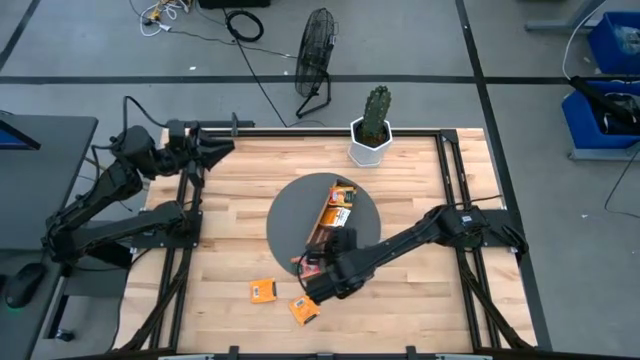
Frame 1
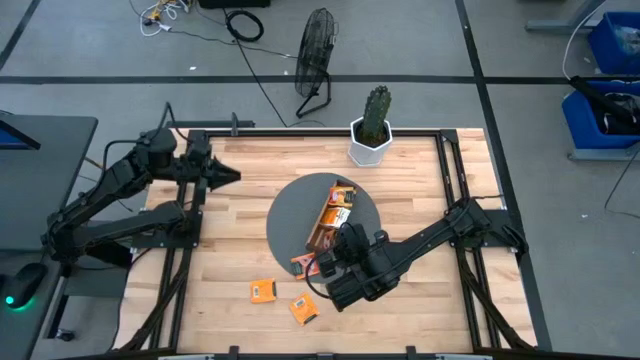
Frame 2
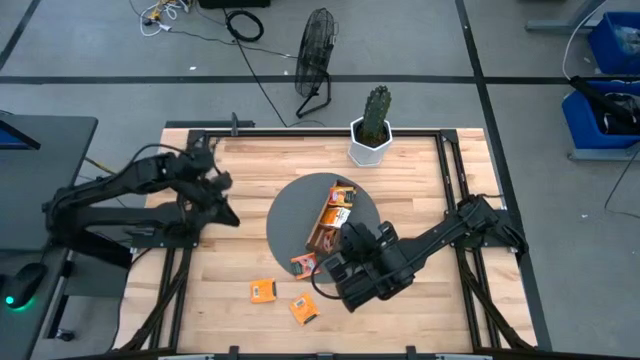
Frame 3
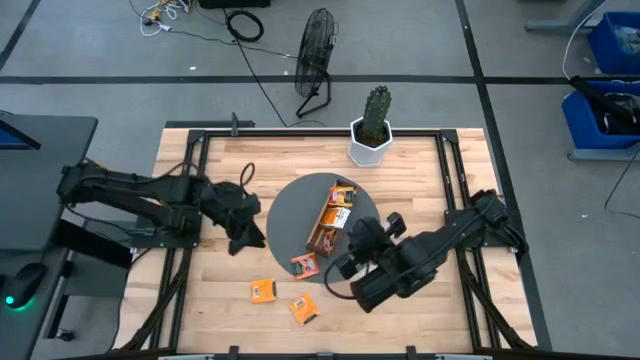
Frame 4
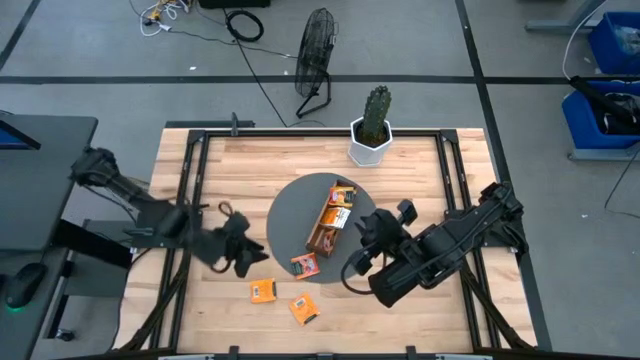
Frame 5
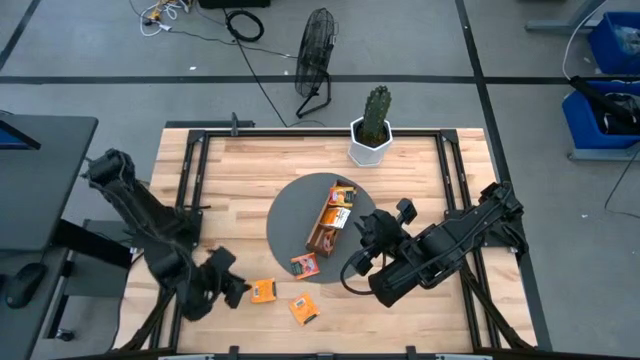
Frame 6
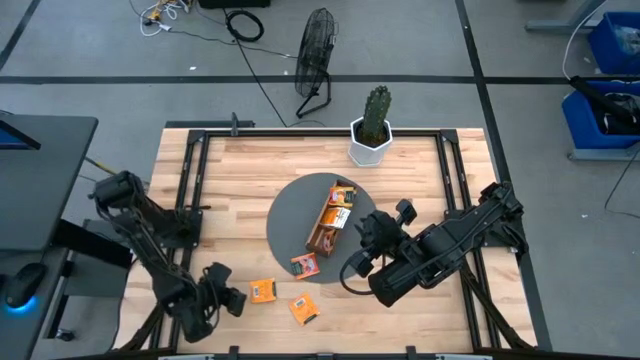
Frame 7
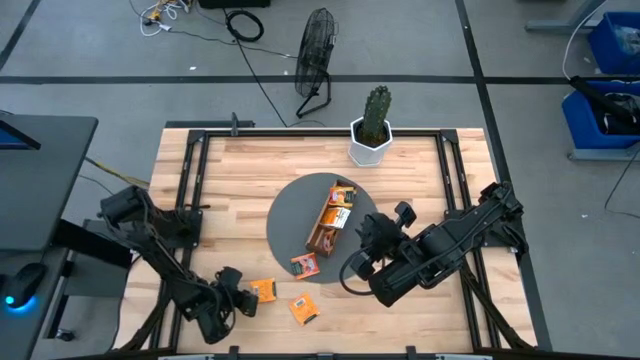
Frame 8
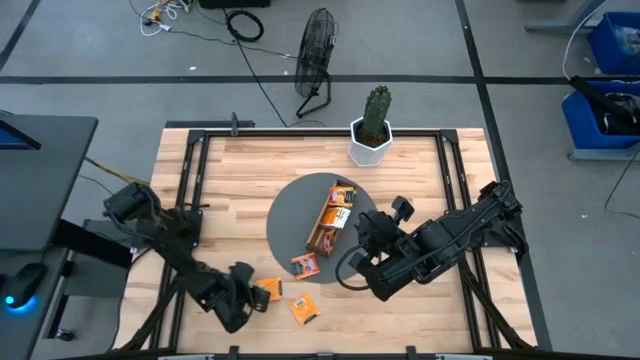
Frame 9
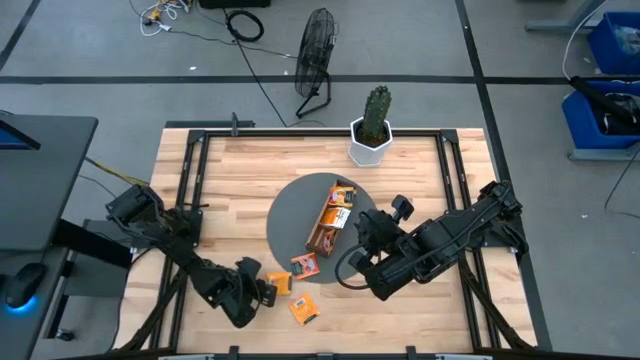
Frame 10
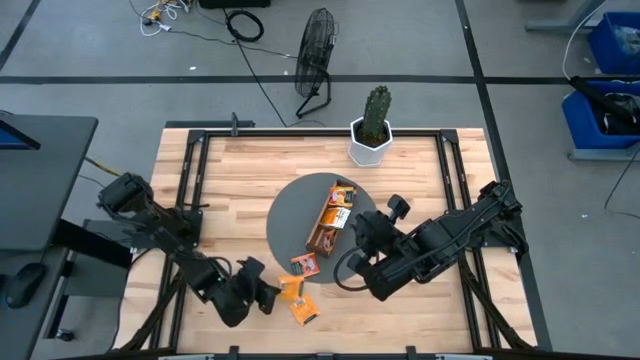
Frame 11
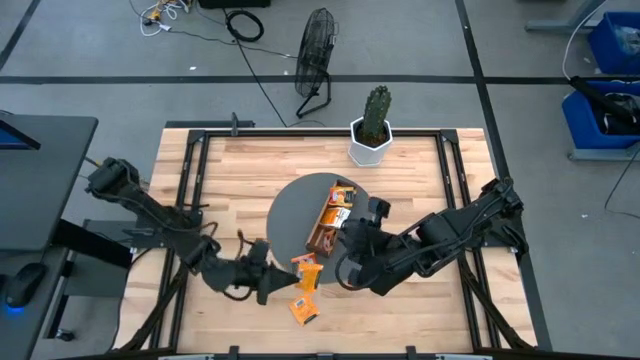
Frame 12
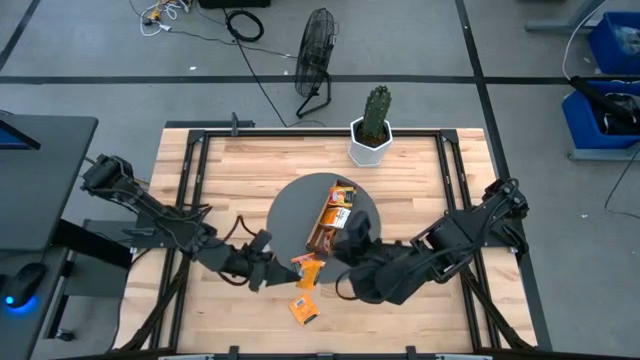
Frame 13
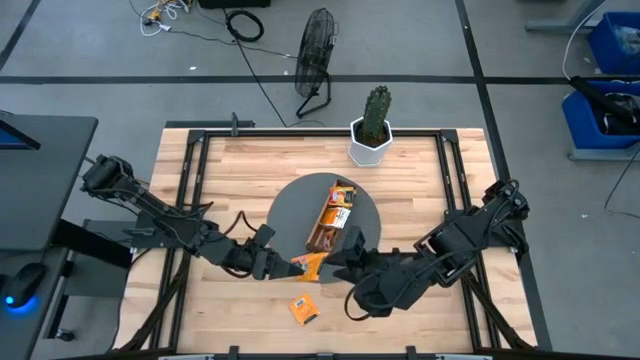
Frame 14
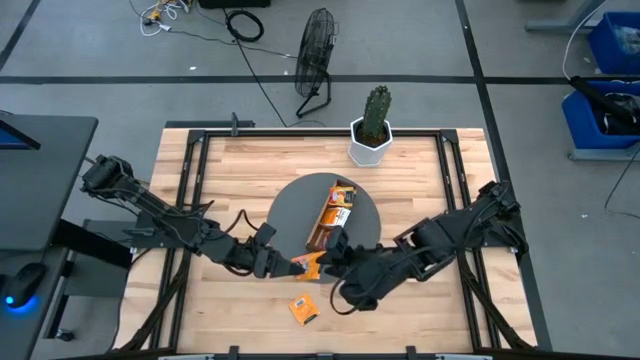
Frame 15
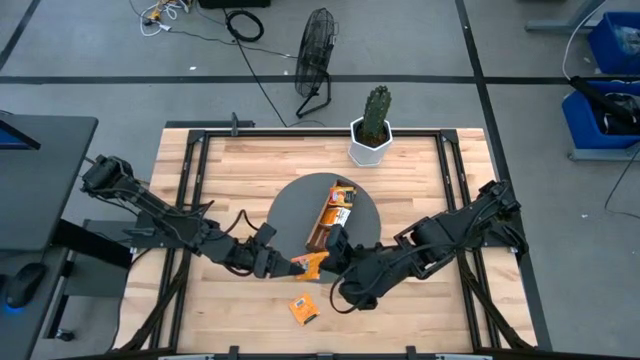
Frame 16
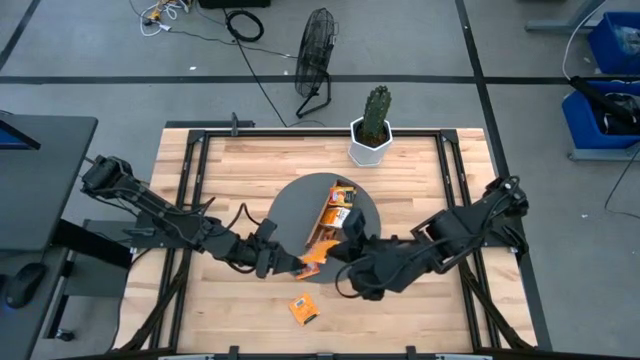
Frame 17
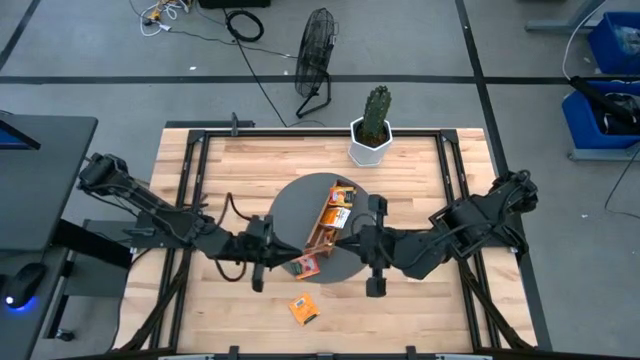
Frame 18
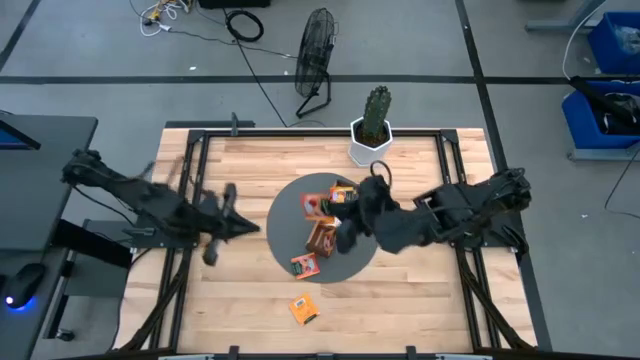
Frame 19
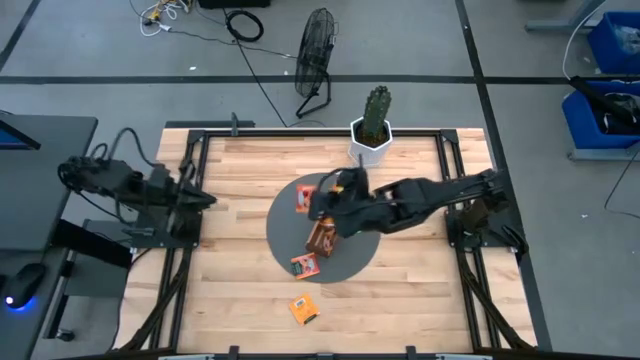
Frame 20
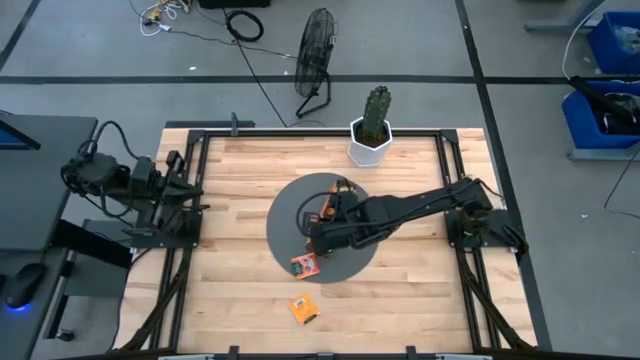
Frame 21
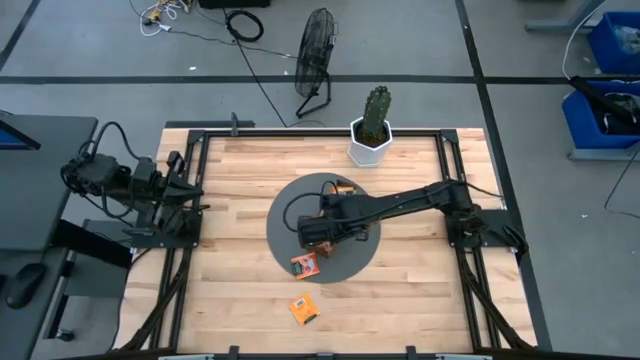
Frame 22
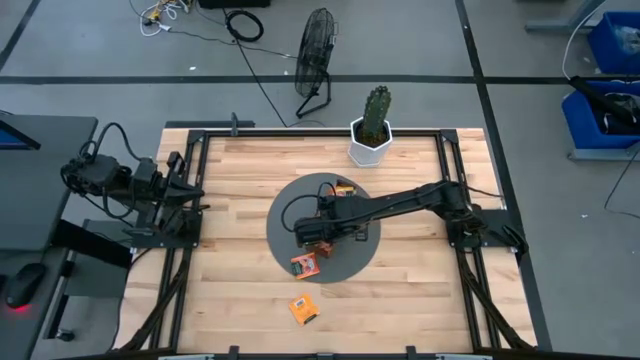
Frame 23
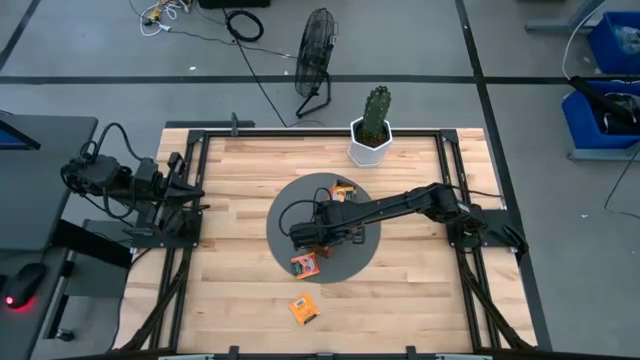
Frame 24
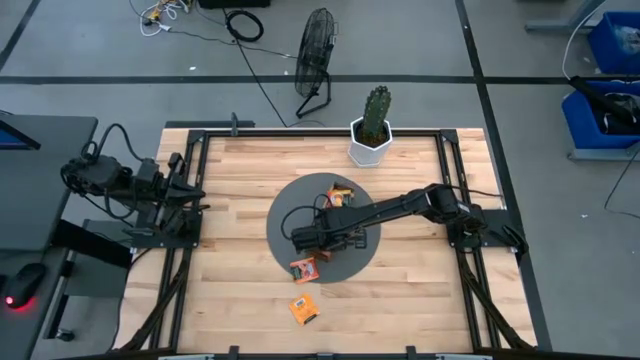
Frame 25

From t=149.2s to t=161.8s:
Task: Pick & Place Tea
Put the red tea bag into the bottom section of the wooden organizer

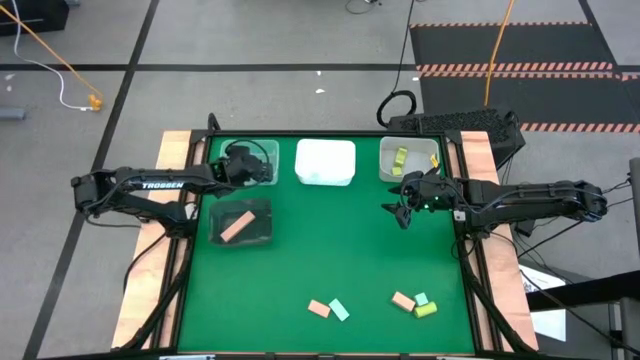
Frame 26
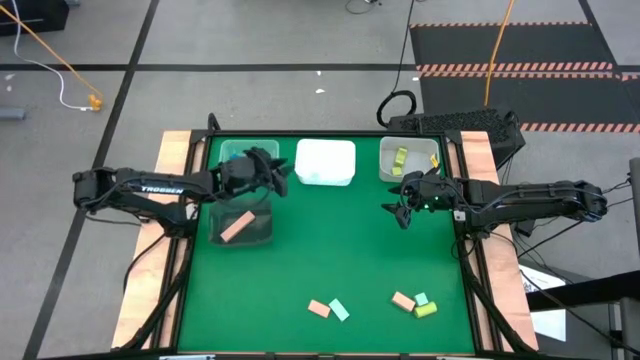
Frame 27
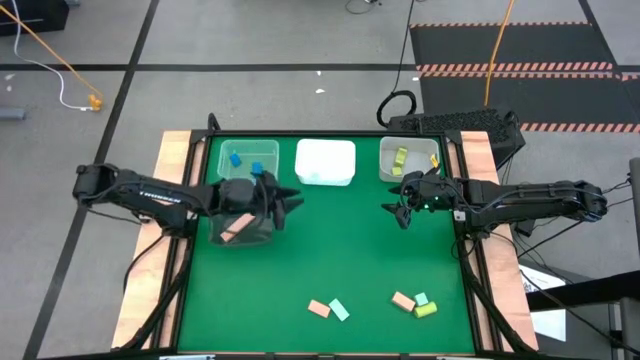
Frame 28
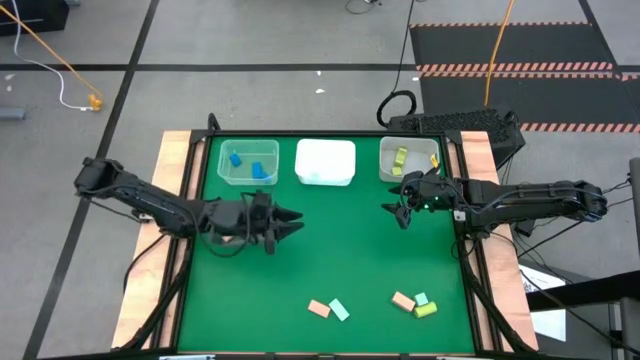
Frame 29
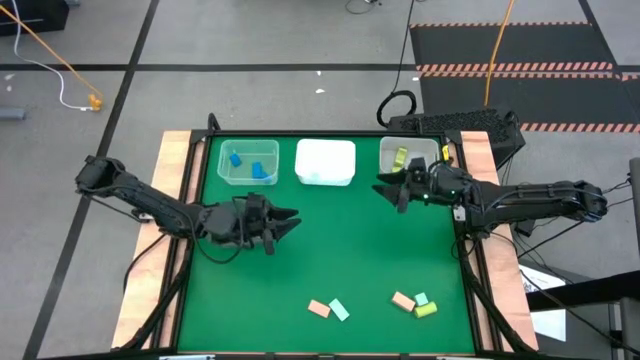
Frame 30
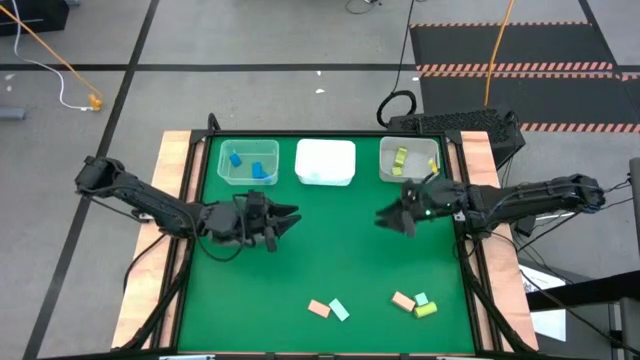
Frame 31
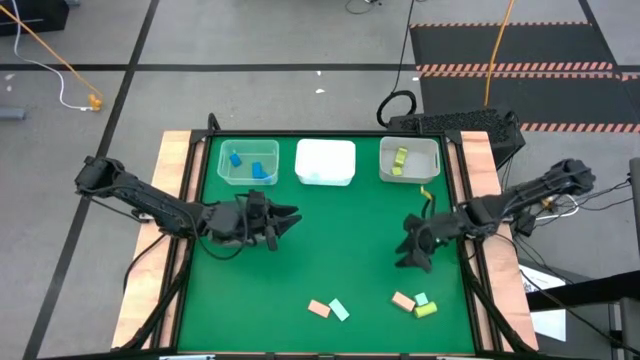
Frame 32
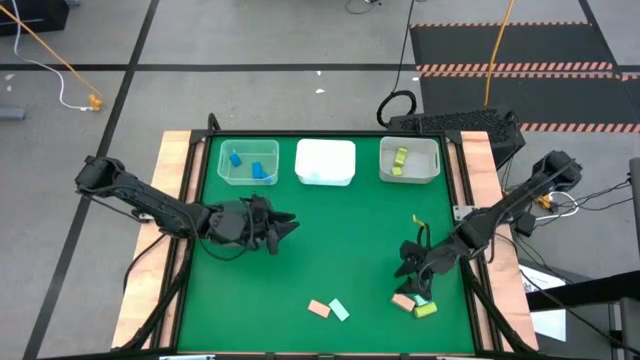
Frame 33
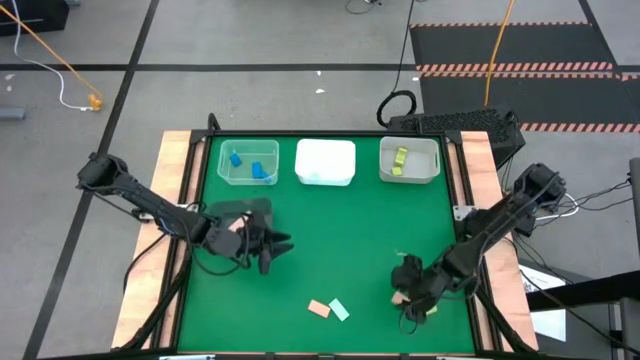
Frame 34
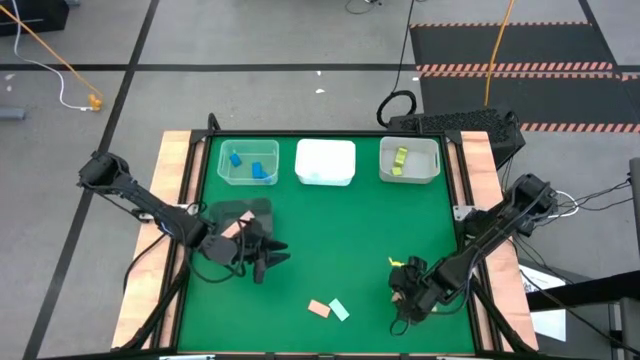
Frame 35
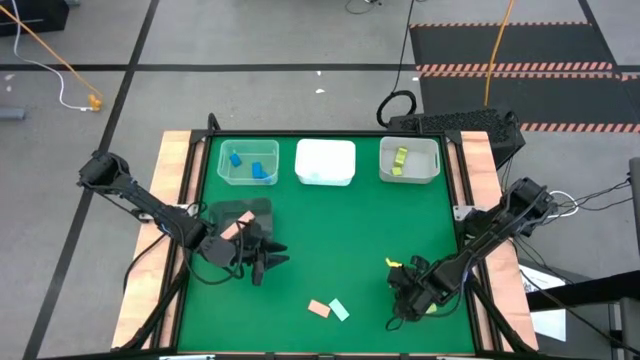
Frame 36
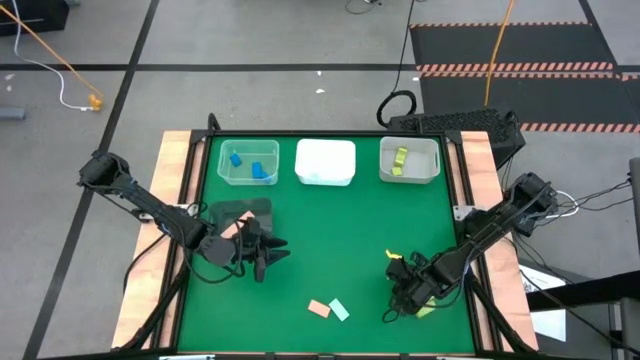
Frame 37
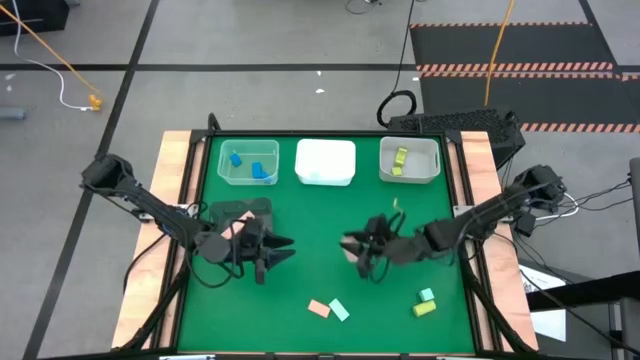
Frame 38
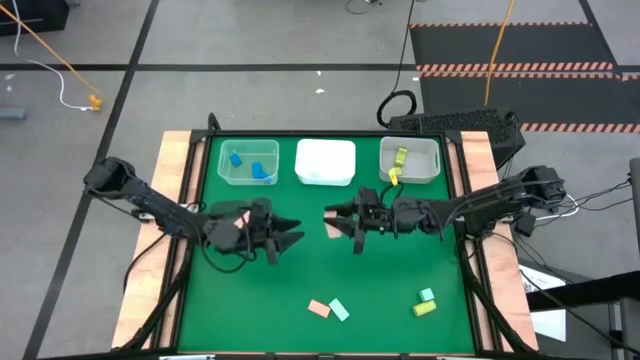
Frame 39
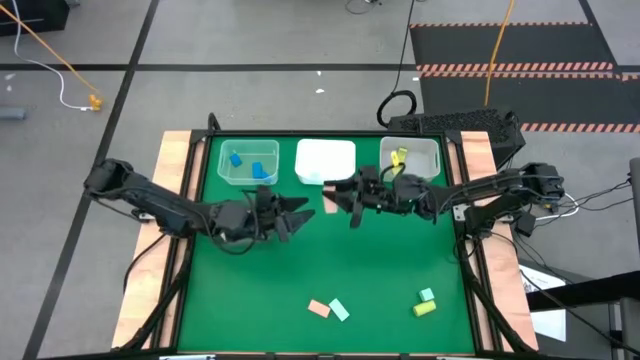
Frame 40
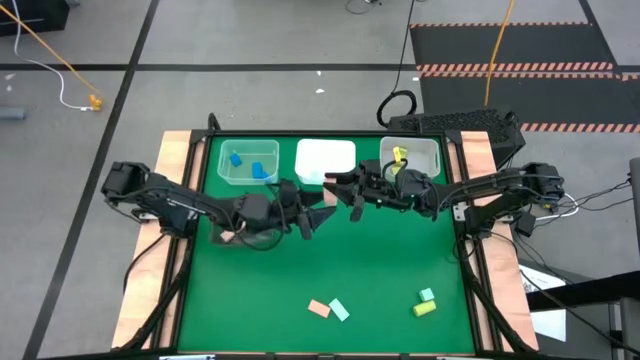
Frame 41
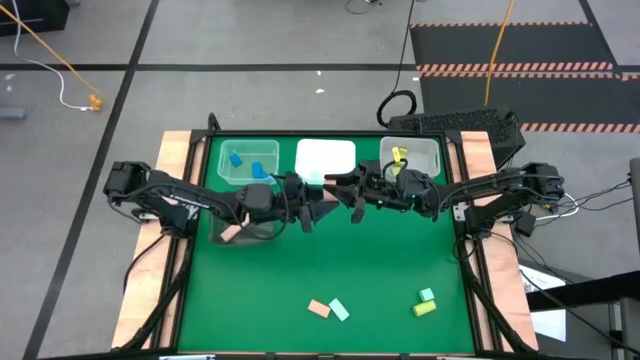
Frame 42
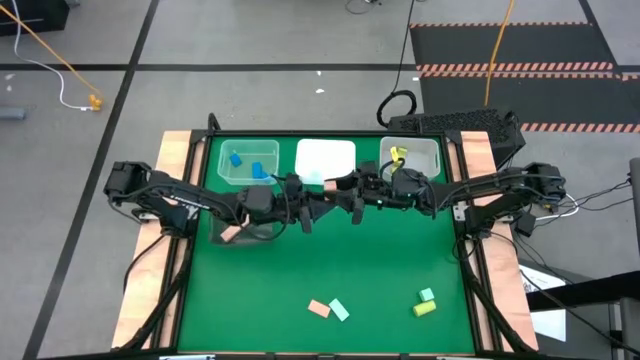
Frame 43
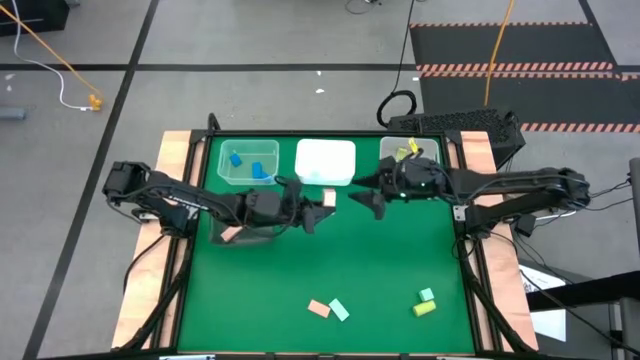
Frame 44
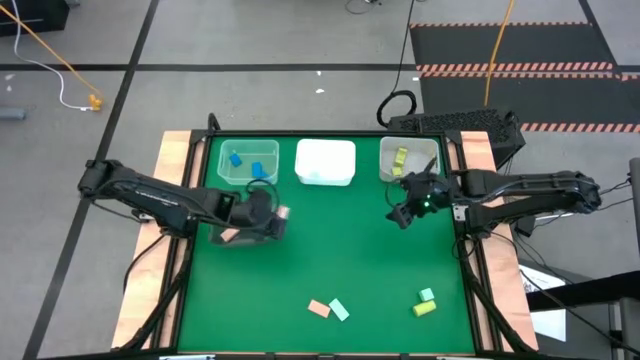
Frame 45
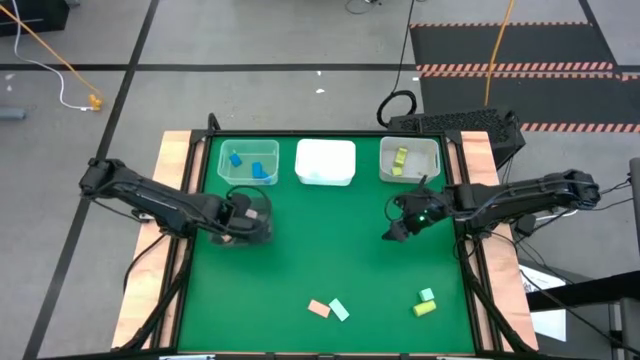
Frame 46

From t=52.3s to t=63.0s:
Task: Sort & place blocks by color
Put the light brown block into the black bin
